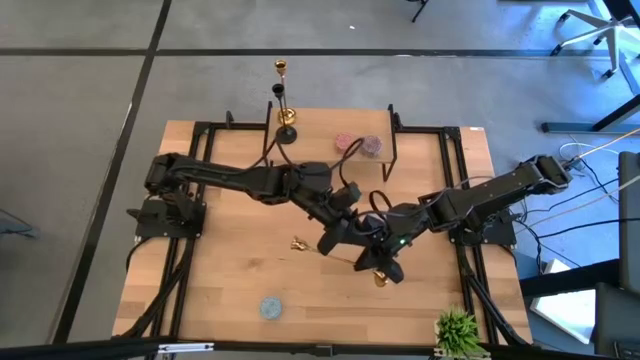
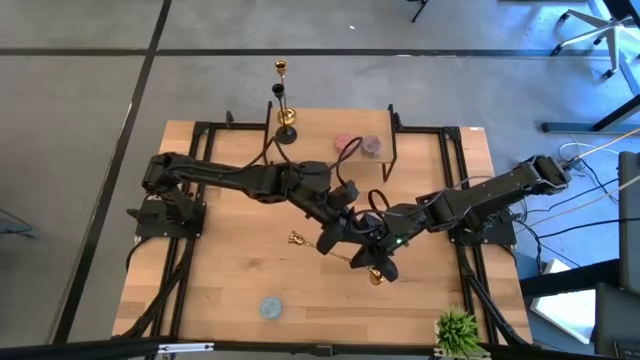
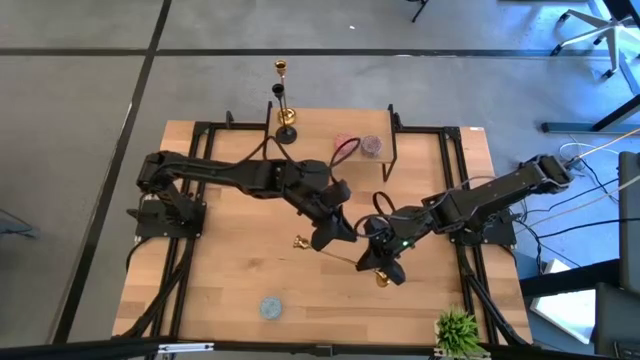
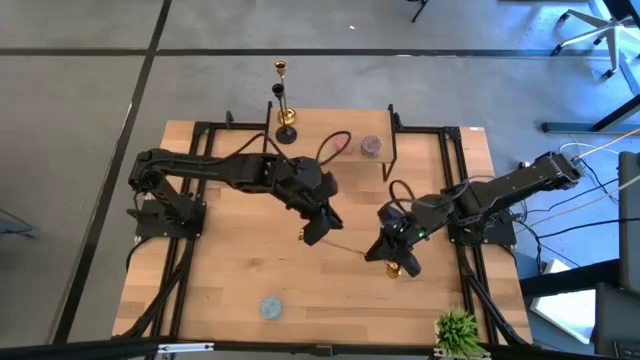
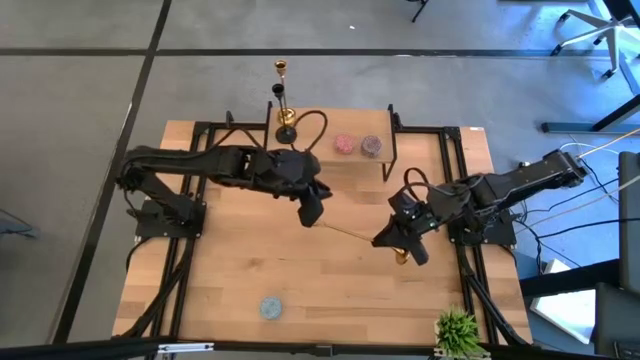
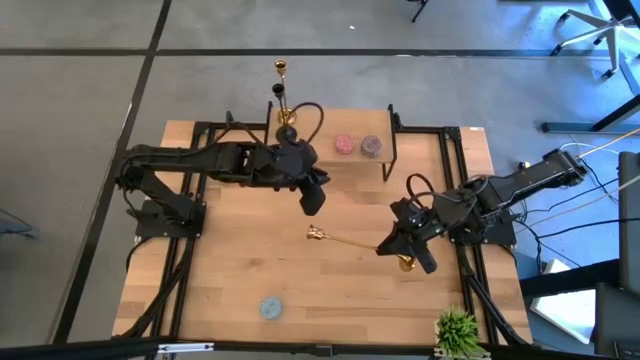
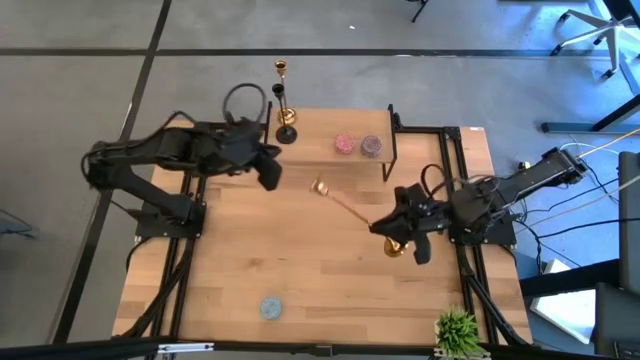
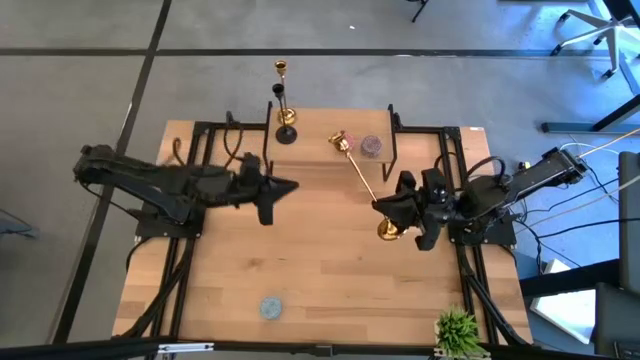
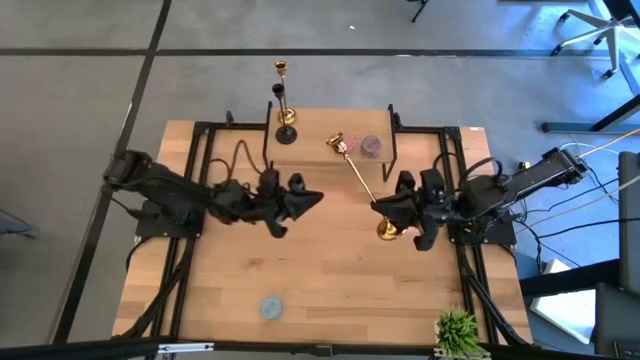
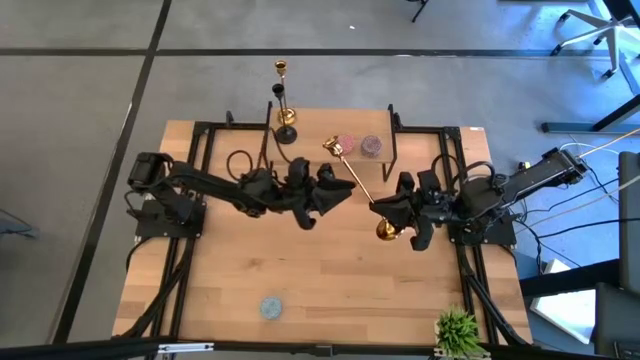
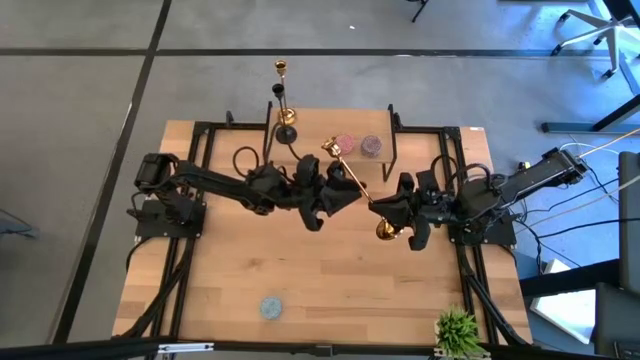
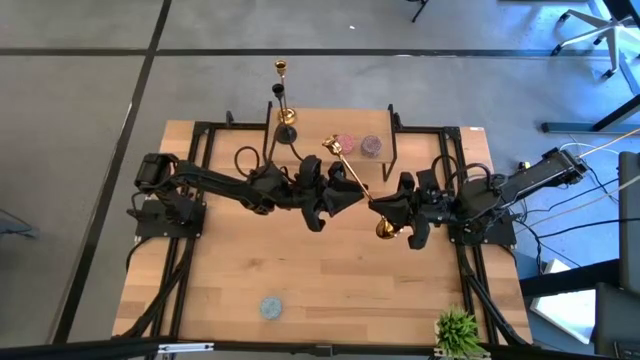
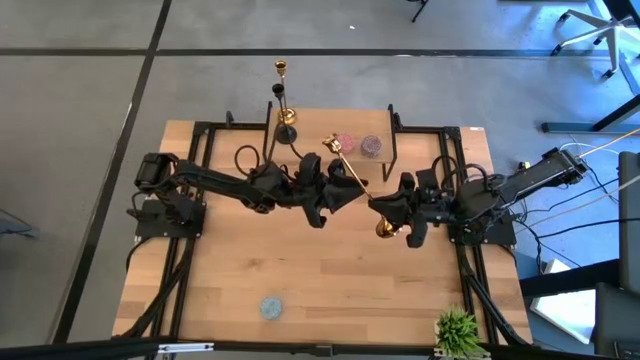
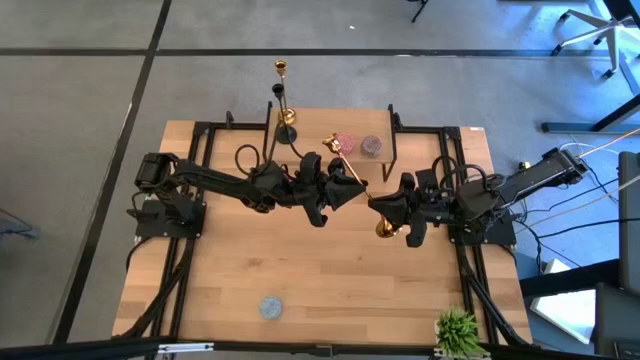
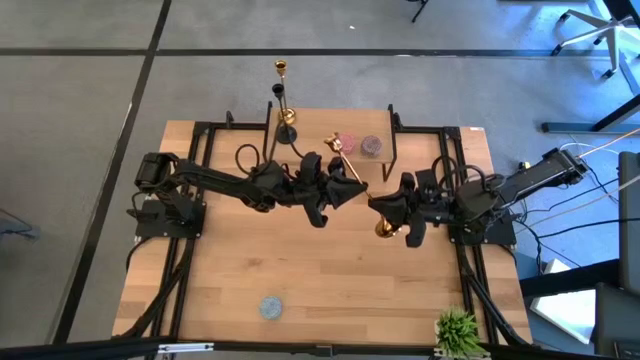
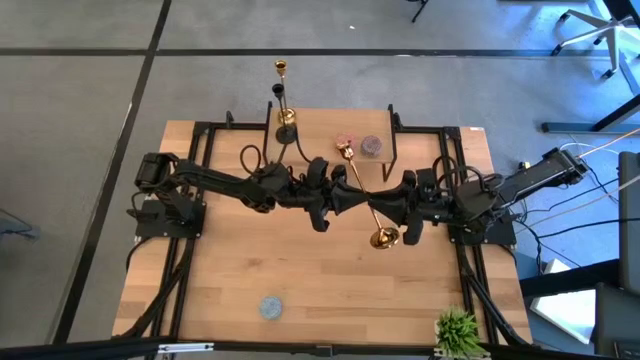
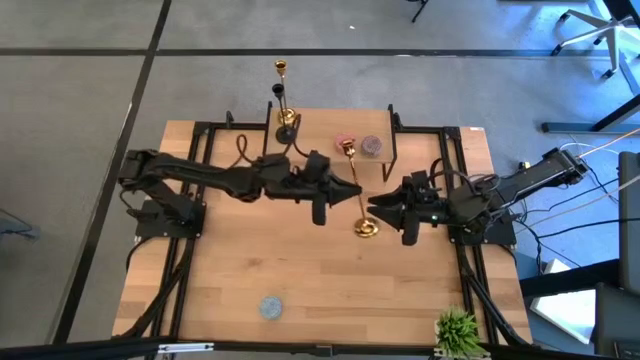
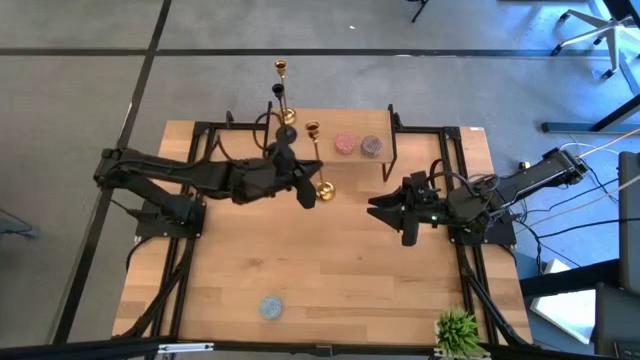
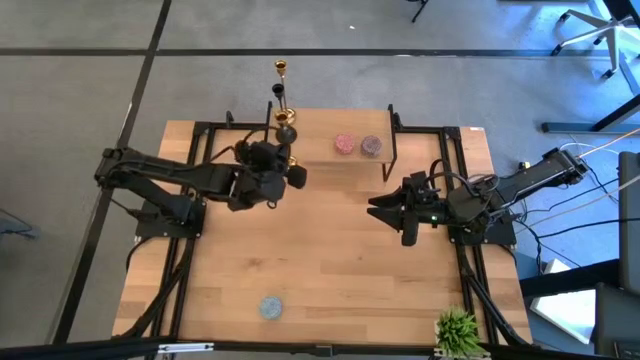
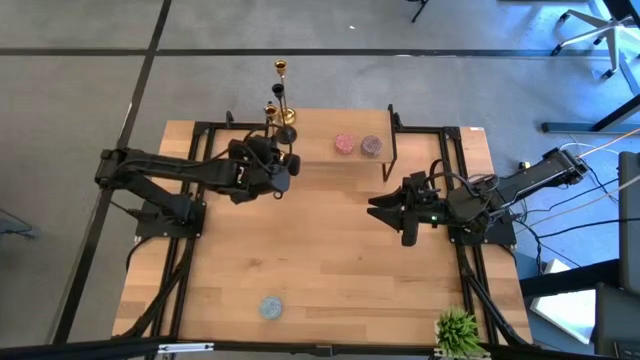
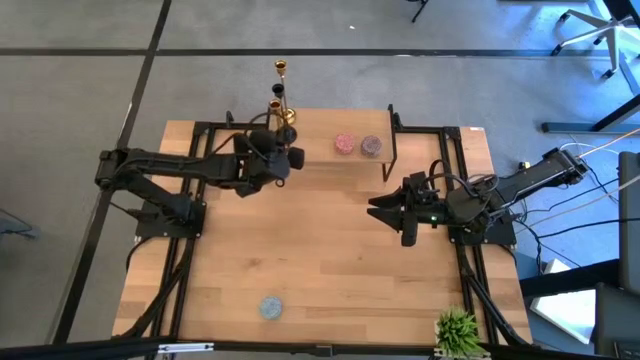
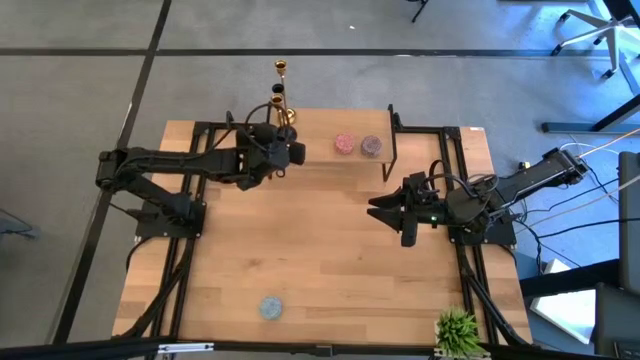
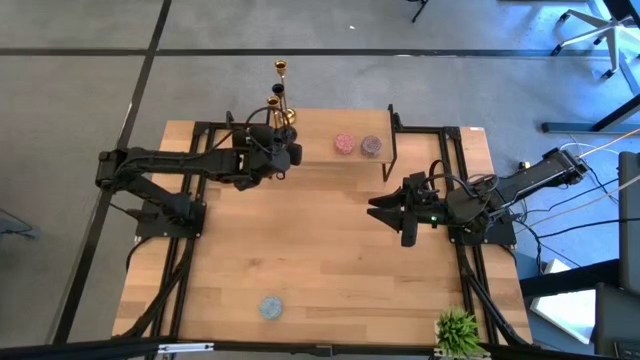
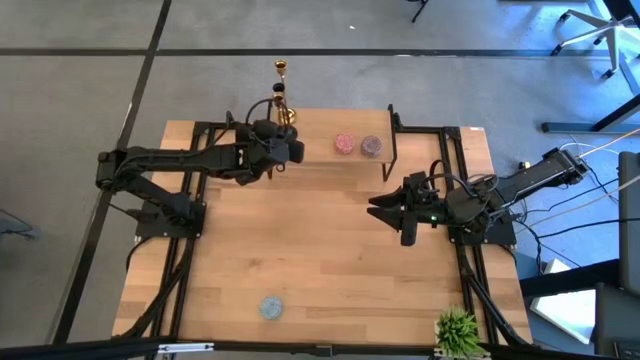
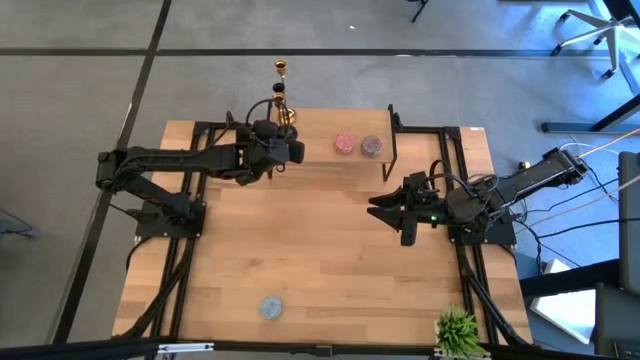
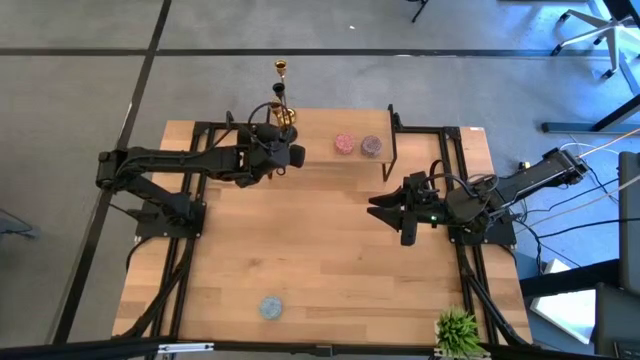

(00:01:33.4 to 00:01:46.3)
Task: Pick & Place candle stick holders
Put the gold brass candlestick on the shelf

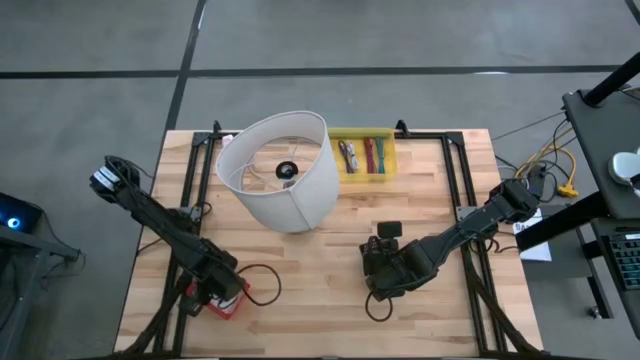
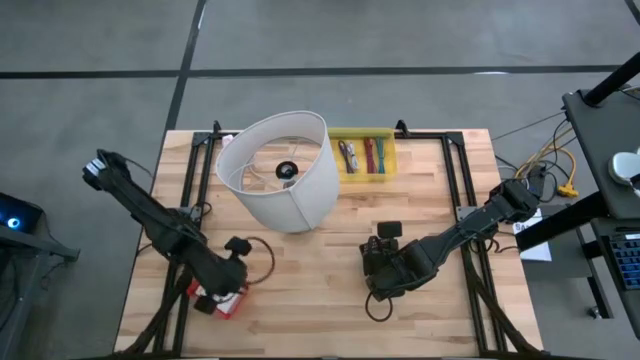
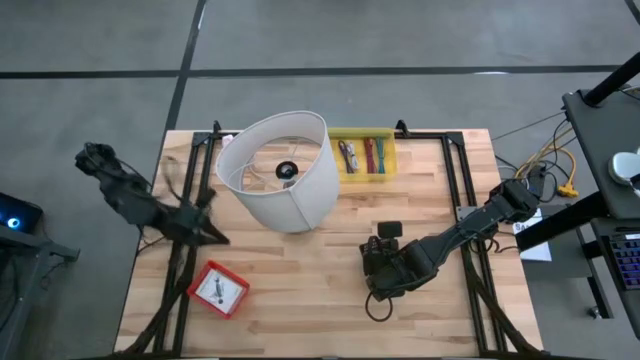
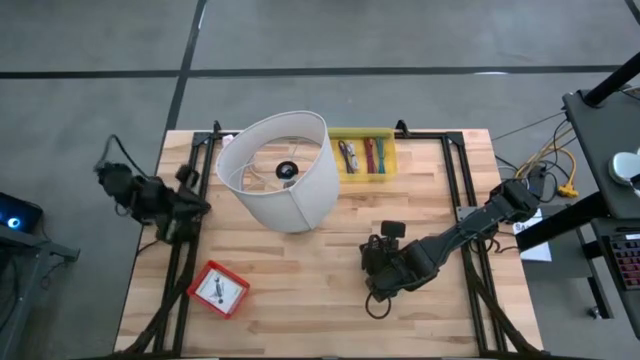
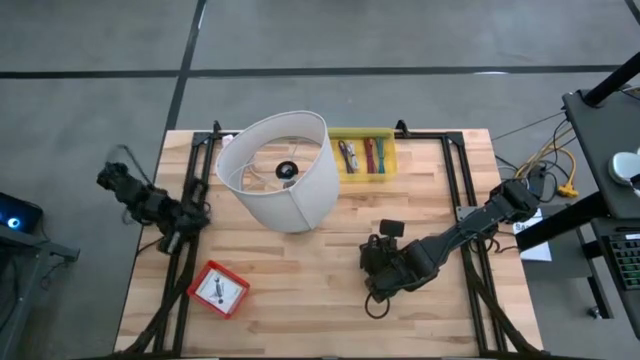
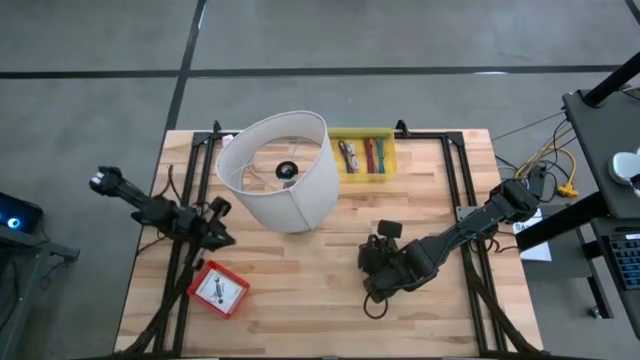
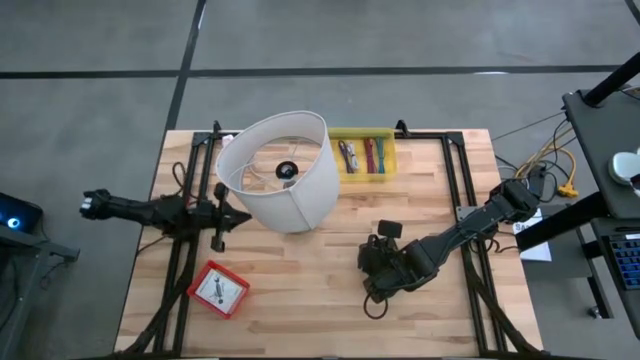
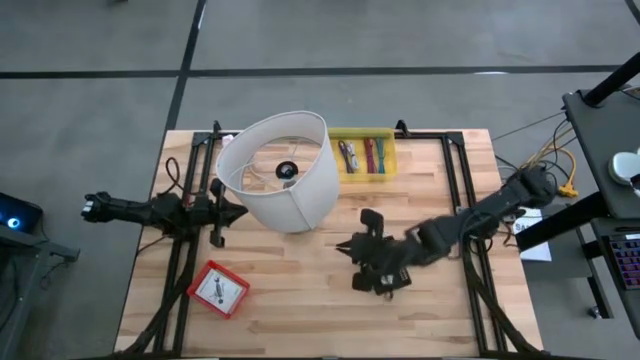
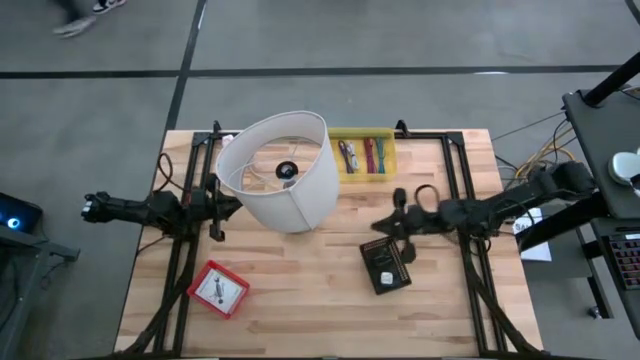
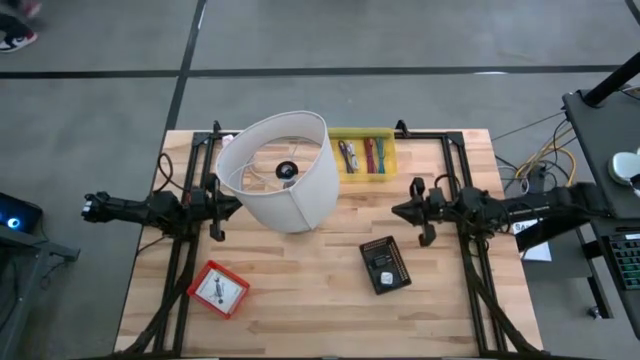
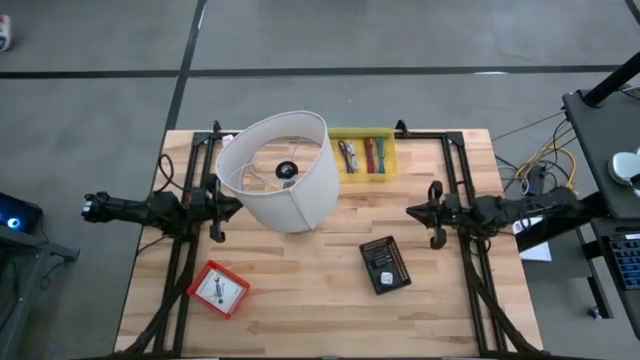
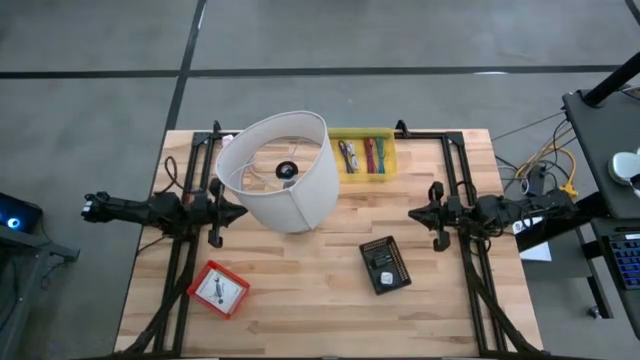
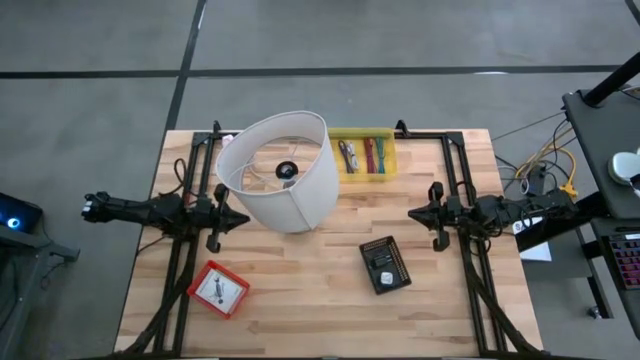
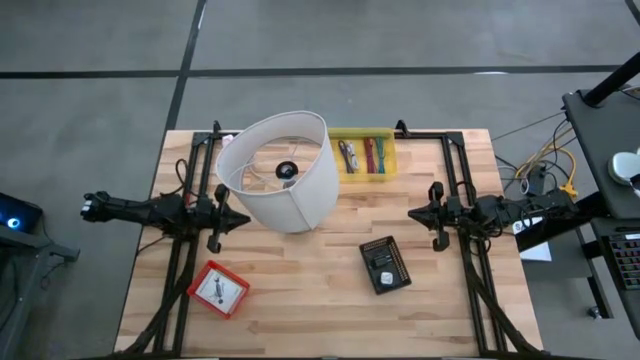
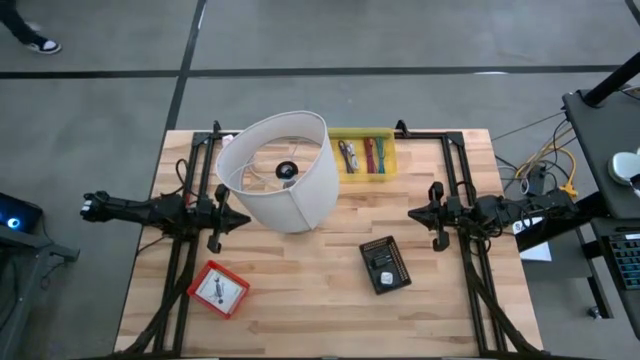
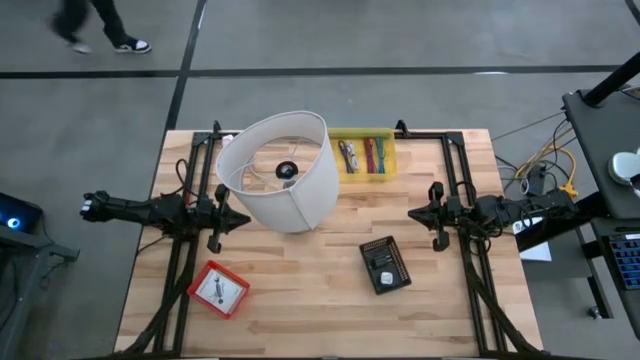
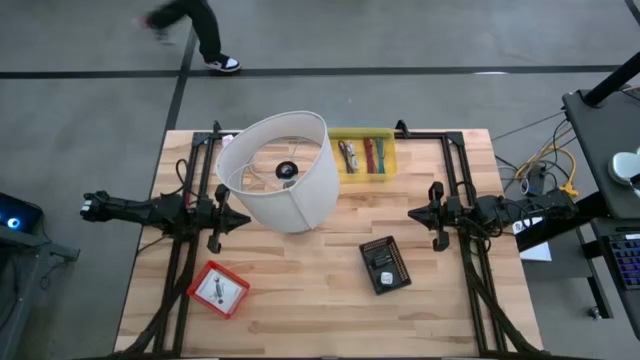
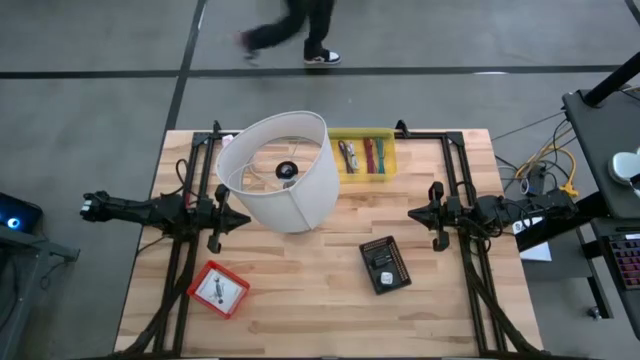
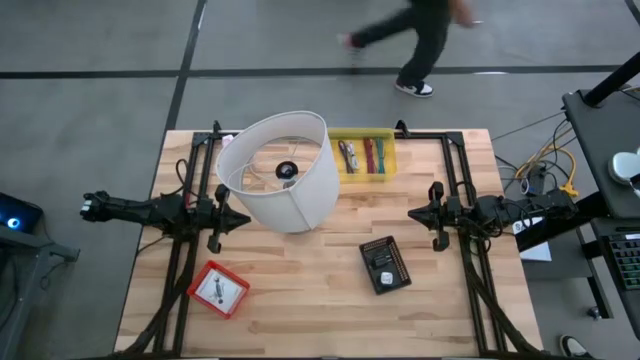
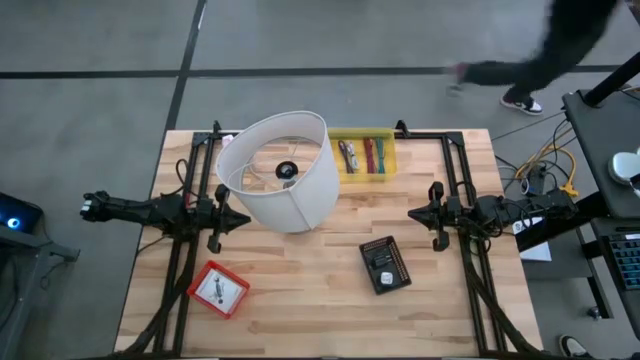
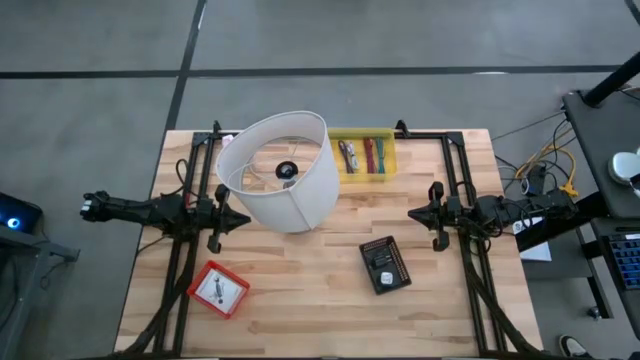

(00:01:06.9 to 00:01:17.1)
Task: Pick and place items into bin
Return to Home Position
